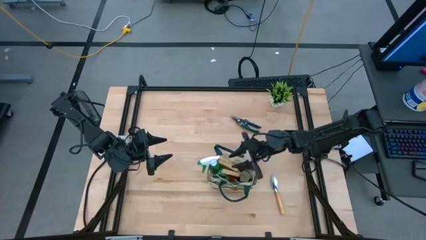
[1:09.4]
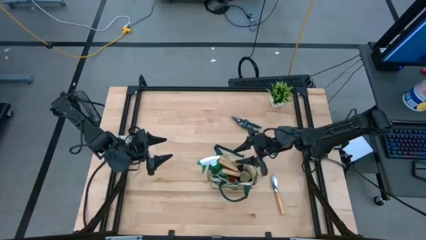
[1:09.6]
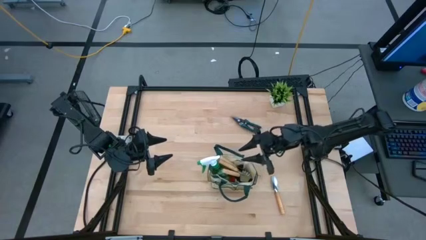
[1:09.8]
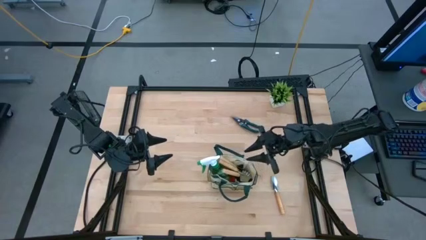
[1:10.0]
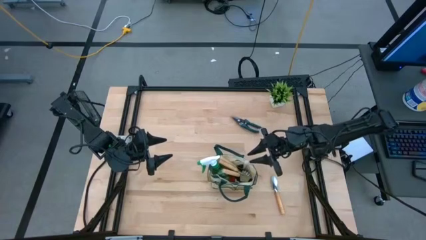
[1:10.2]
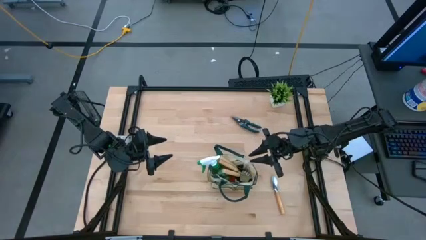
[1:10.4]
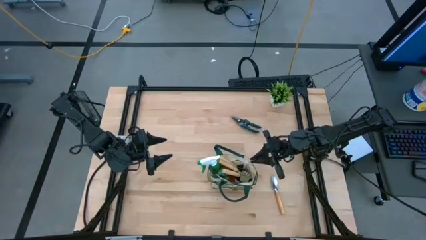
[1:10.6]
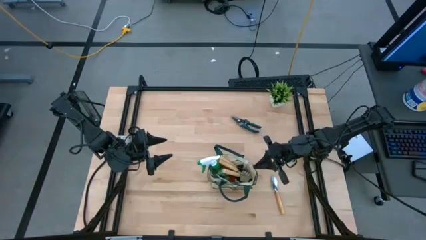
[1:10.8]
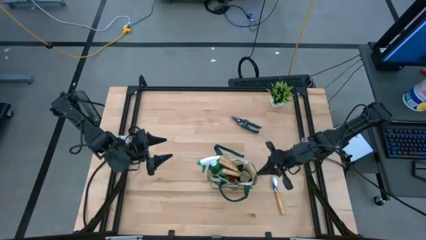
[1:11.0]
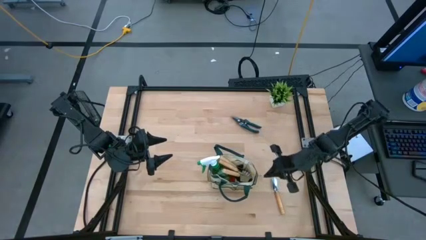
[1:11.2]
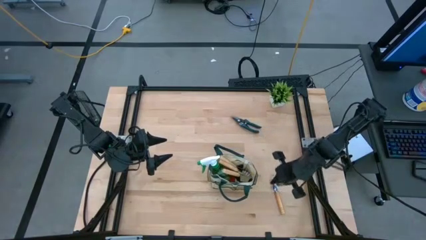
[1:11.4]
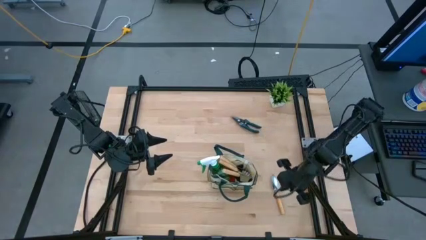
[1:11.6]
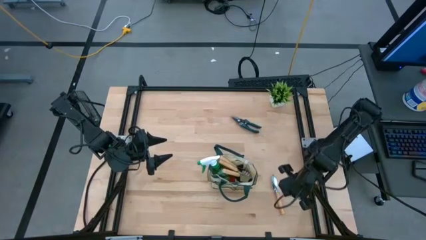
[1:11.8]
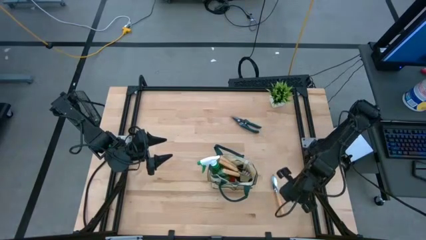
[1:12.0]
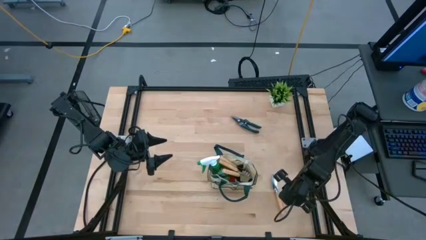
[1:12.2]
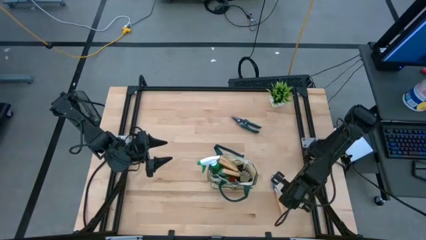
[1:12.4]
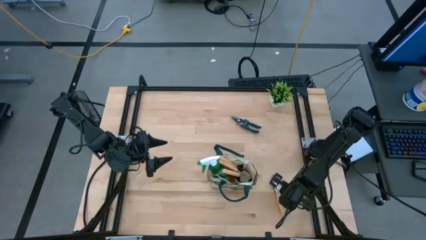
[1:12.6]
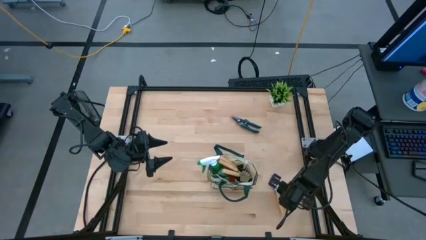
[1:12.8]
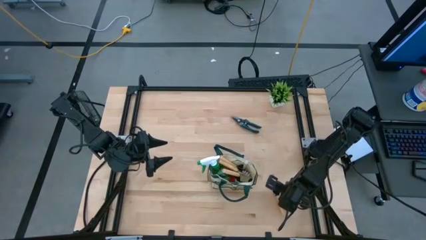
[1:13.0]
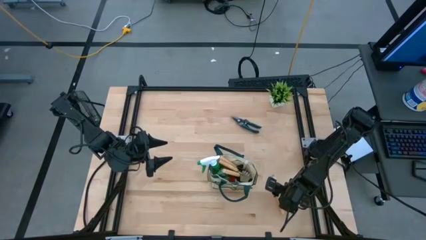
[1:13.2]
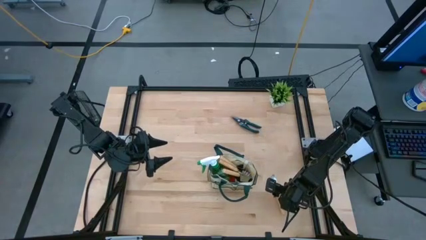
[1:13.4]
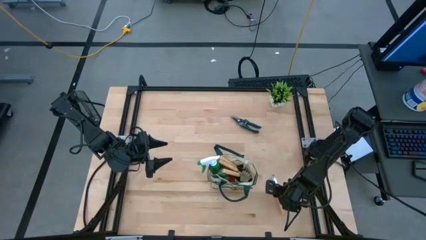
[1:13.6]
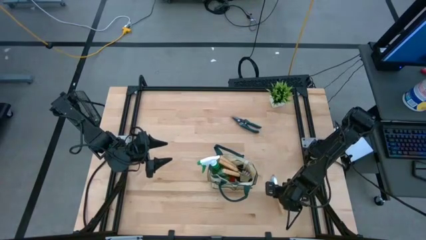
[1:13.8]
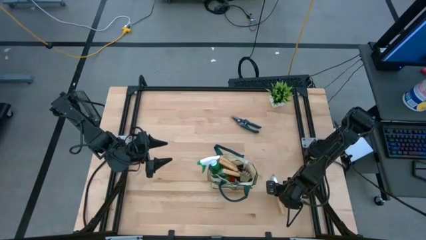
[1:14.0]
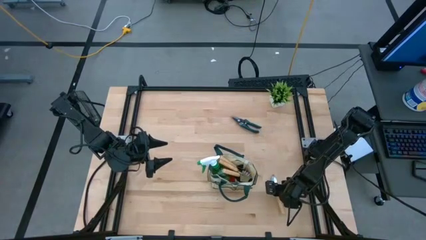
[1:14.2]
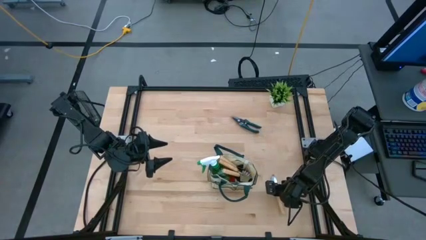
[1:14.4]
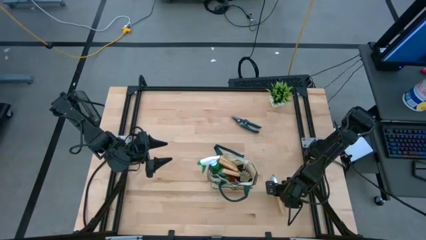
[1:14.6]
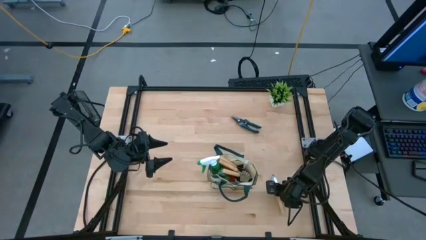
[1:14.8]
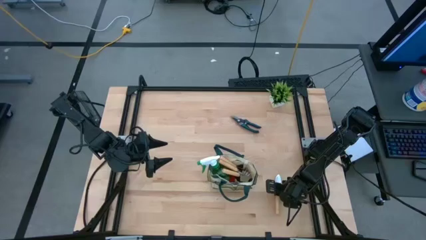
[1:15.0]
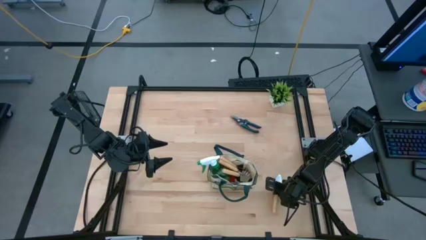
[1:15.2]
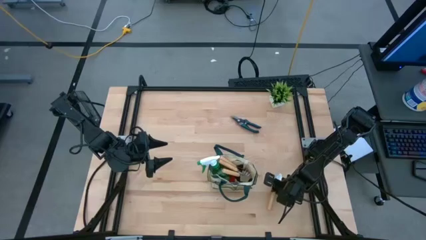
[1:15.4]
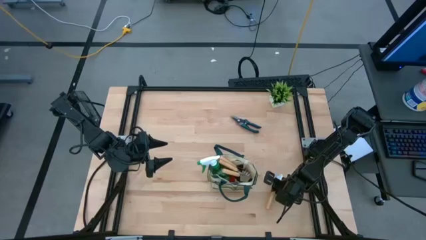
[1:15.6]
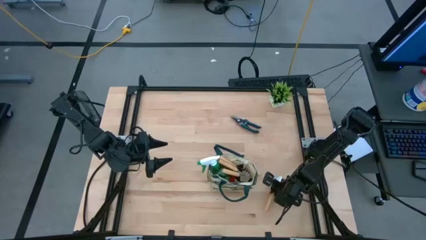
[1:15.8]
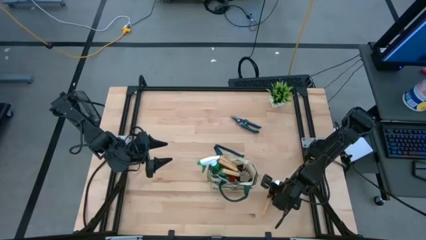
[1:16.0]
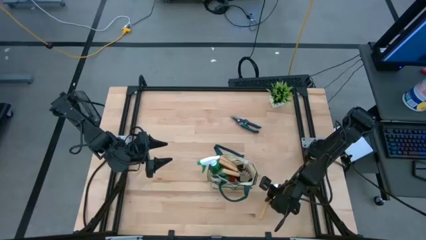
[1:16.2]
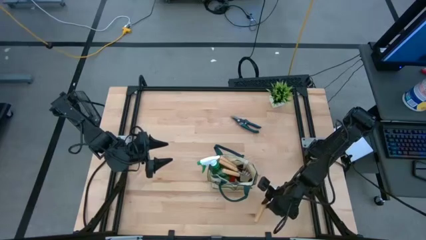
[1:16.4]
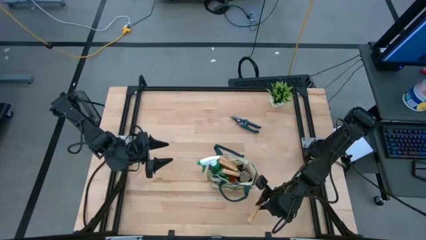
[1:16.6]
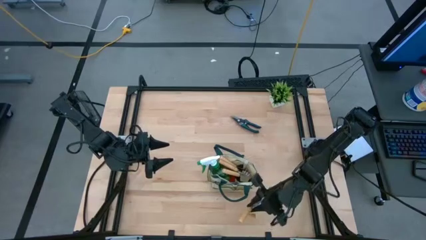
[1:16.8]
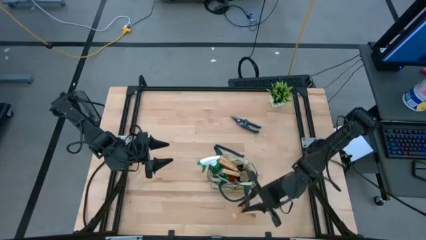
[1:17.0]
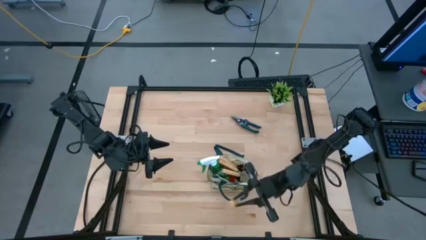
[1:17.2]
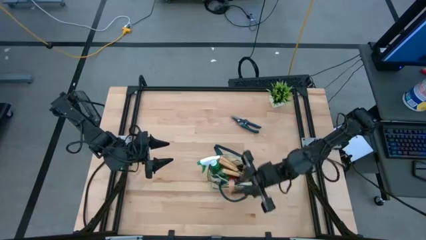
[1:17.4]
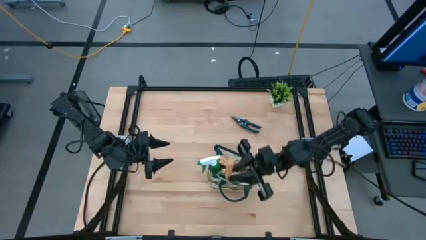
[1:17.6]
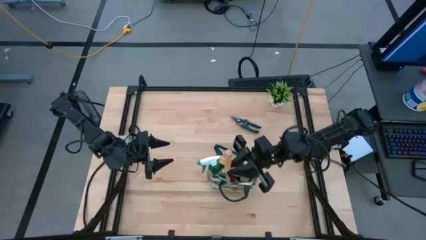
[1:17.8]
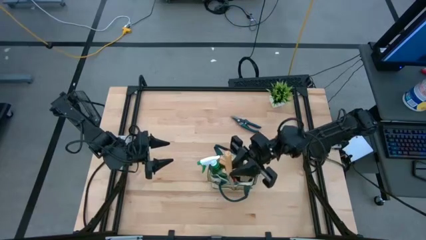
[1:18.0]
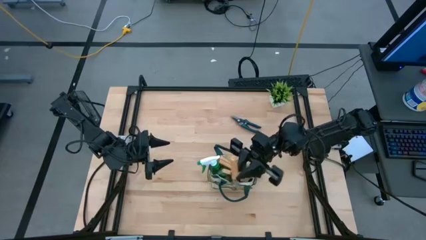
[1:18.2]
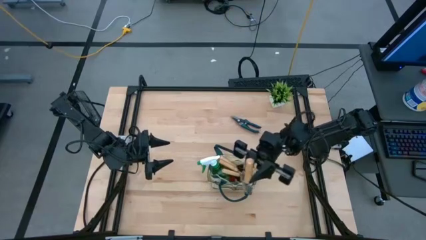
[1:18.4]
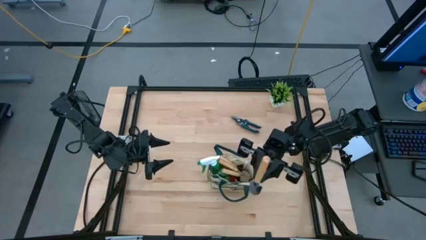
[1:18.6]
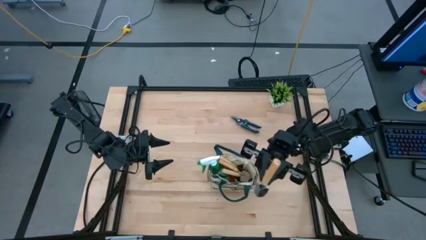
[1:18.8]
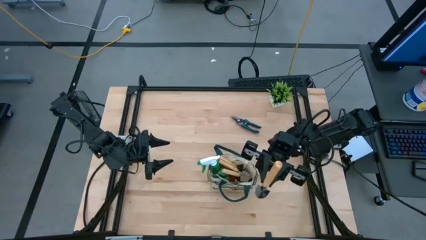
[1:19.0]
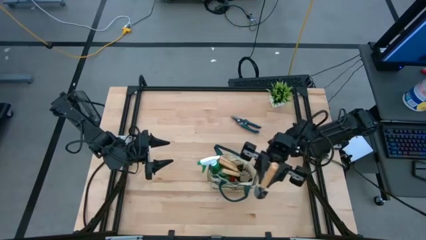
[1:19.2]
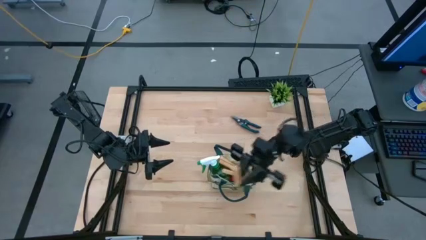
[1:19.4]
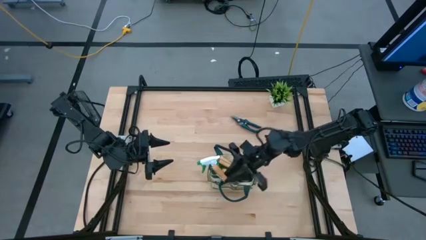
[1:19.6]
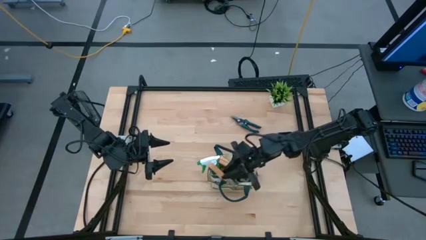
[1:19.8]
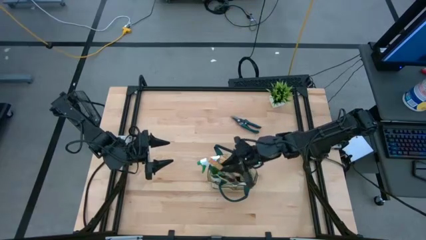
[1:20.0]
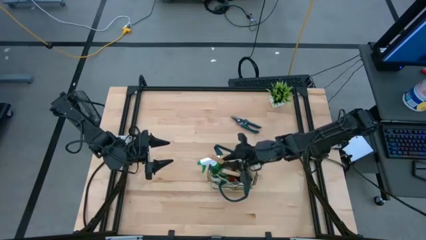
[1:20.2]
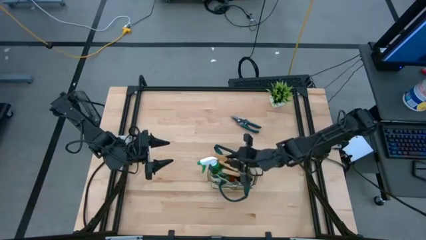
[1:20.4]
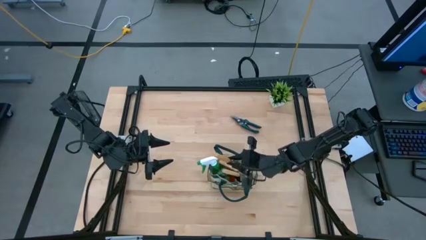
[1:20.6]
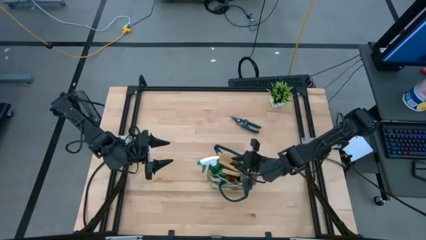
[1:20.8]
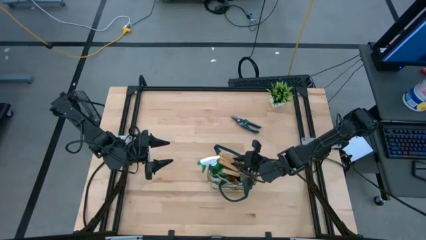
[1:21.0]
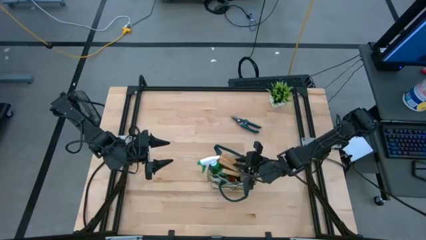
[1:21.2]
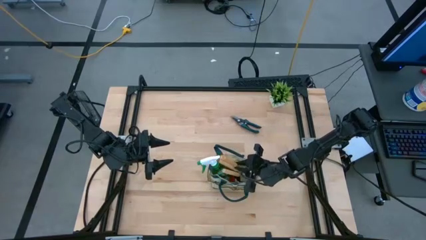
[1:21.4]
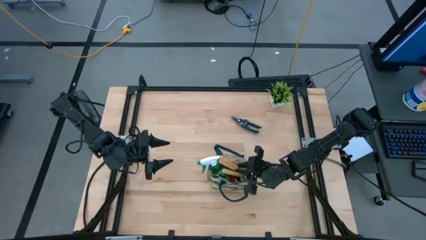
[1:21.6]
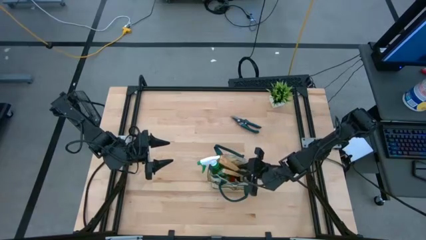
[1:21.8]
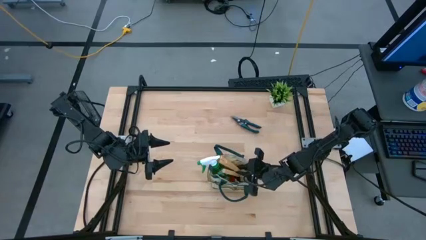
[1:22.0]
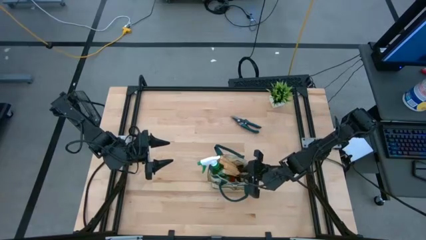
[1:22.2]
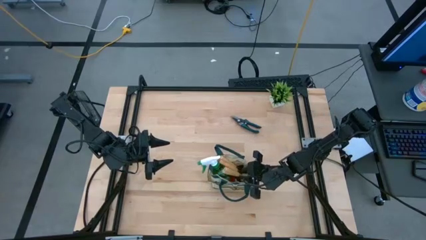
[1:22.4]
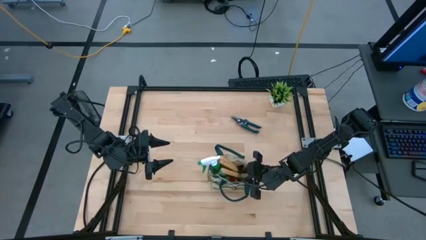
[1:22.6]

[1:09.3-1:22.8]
Task: Pick & Place Garden tools in Gardening bag
Put the brown trowel into the gardening bag
